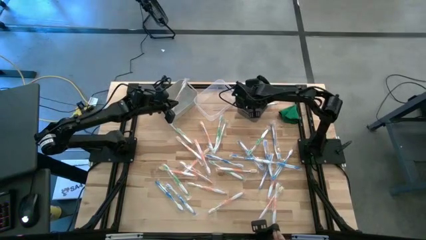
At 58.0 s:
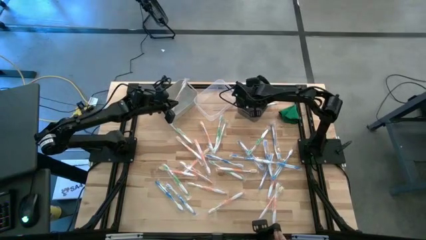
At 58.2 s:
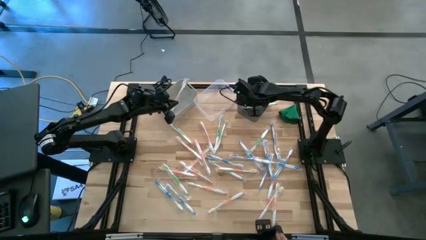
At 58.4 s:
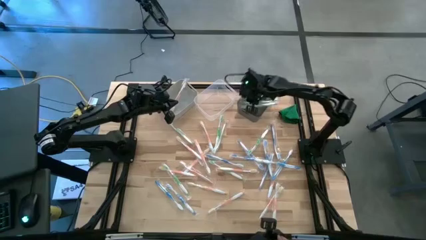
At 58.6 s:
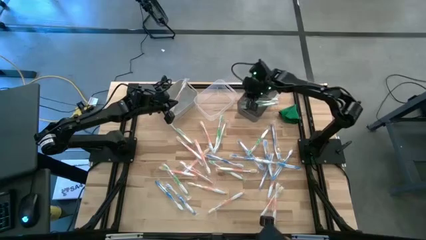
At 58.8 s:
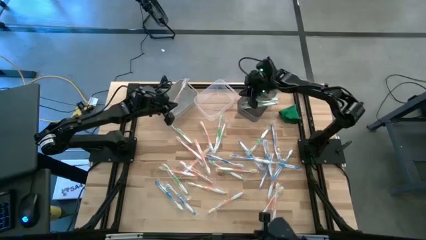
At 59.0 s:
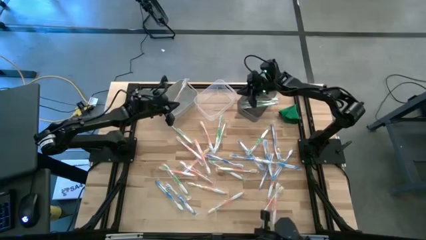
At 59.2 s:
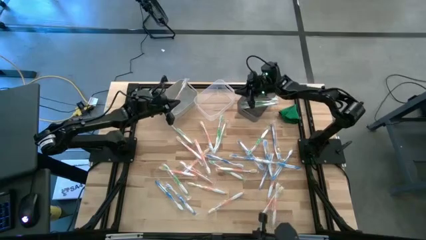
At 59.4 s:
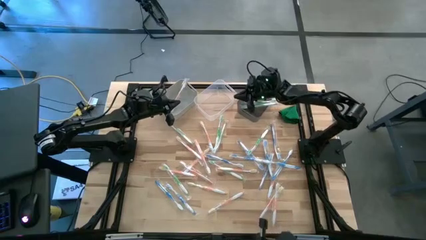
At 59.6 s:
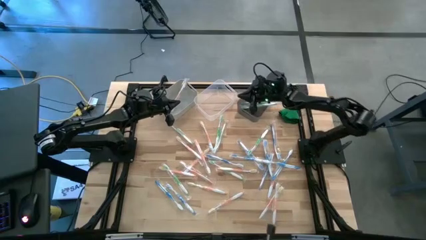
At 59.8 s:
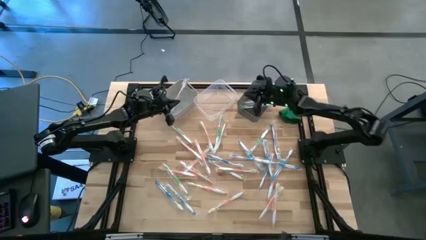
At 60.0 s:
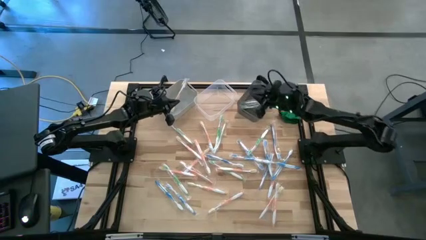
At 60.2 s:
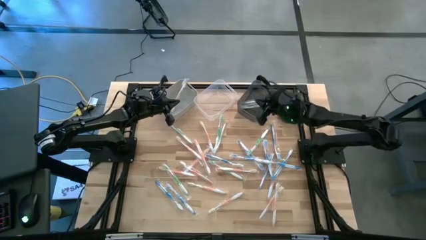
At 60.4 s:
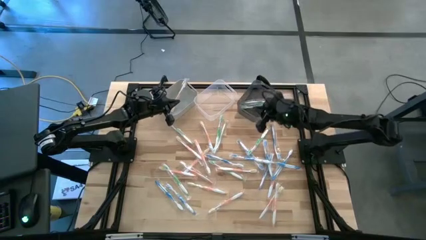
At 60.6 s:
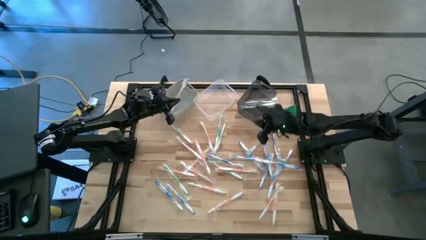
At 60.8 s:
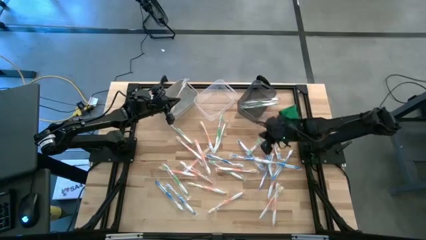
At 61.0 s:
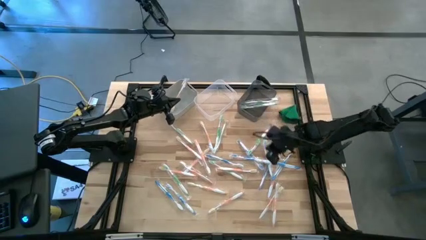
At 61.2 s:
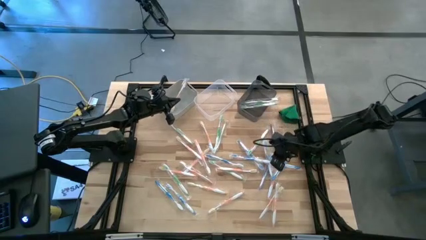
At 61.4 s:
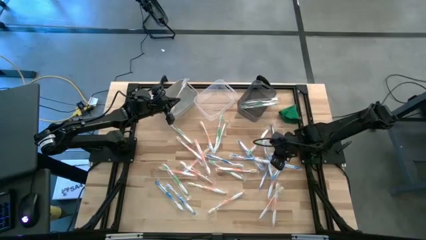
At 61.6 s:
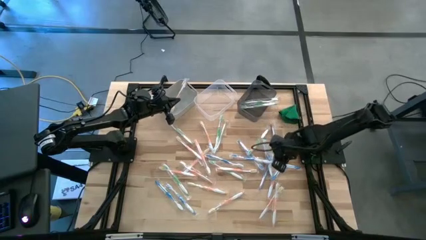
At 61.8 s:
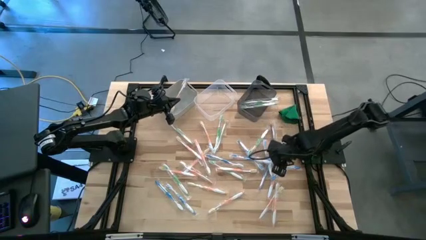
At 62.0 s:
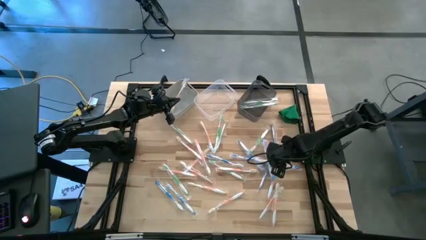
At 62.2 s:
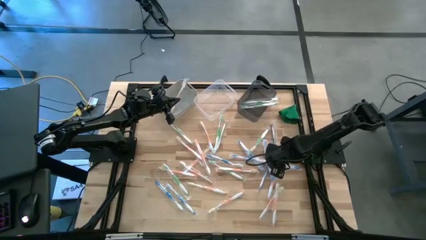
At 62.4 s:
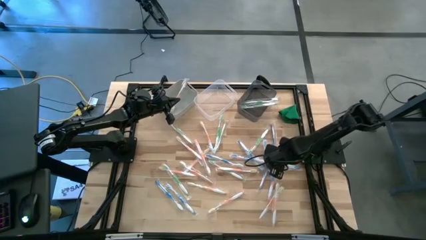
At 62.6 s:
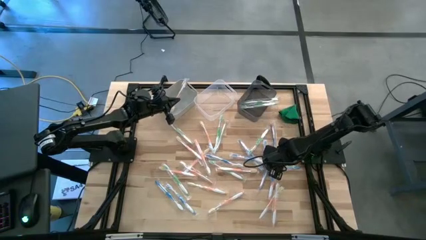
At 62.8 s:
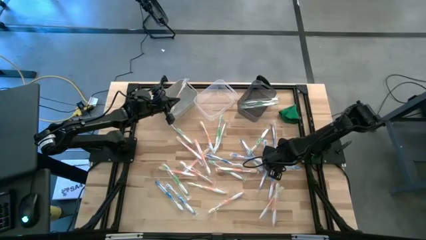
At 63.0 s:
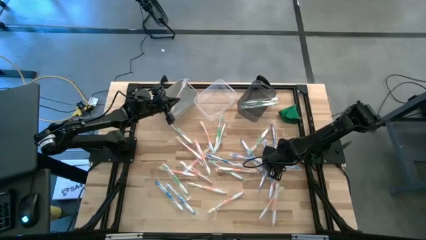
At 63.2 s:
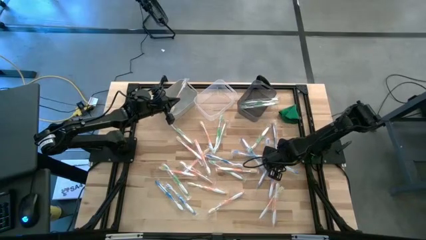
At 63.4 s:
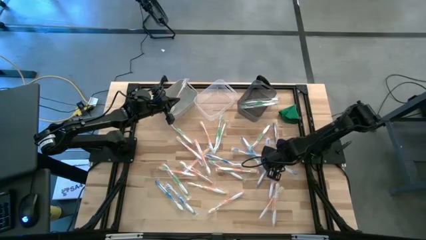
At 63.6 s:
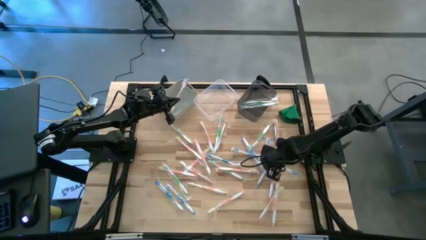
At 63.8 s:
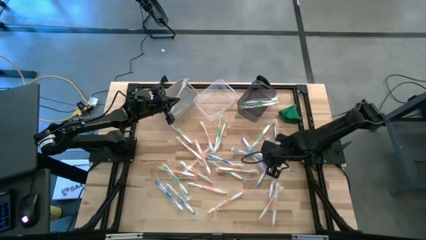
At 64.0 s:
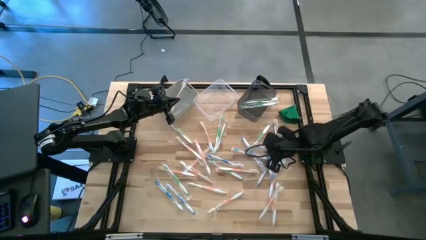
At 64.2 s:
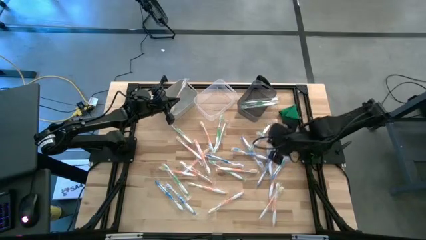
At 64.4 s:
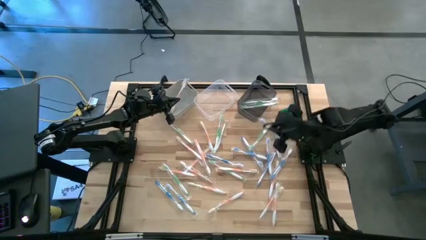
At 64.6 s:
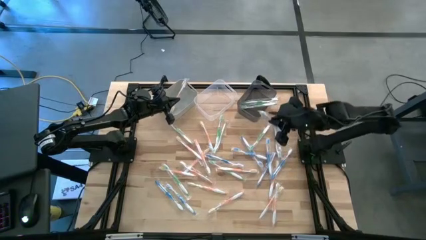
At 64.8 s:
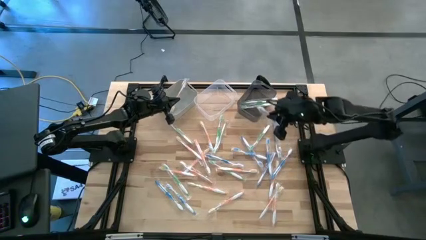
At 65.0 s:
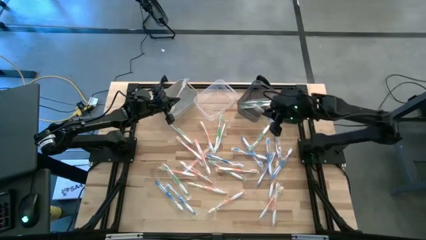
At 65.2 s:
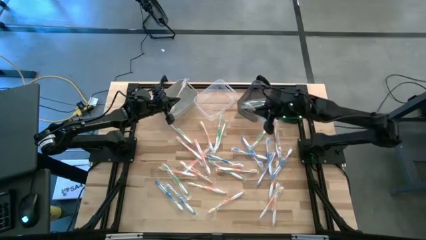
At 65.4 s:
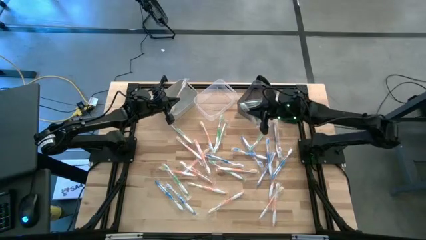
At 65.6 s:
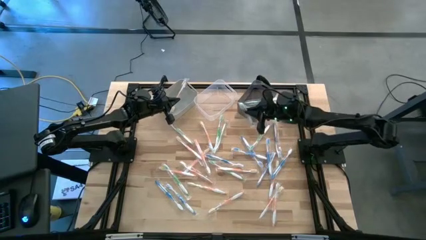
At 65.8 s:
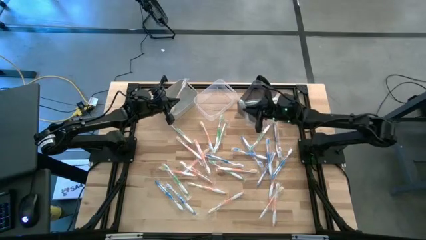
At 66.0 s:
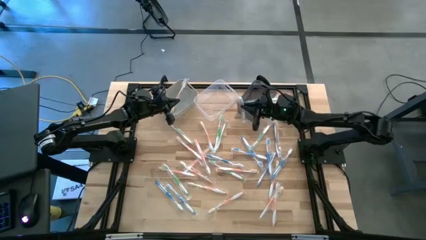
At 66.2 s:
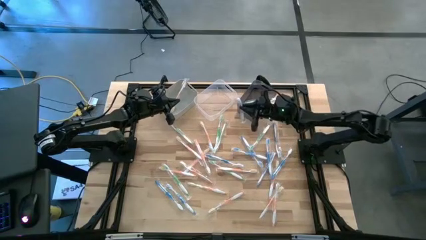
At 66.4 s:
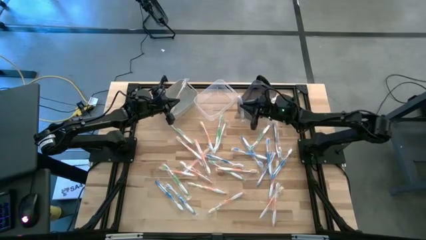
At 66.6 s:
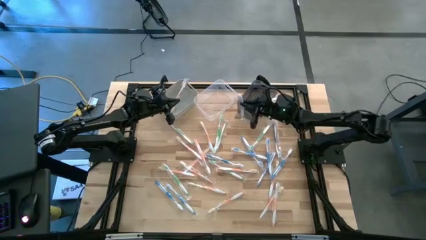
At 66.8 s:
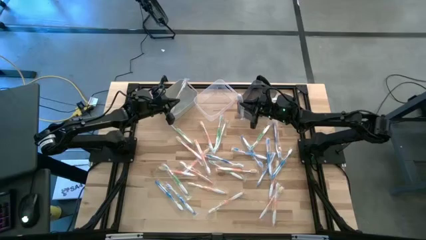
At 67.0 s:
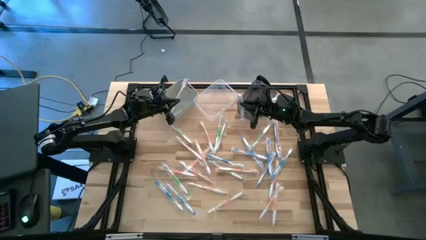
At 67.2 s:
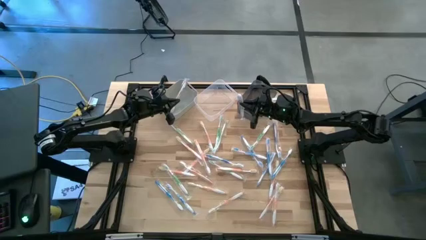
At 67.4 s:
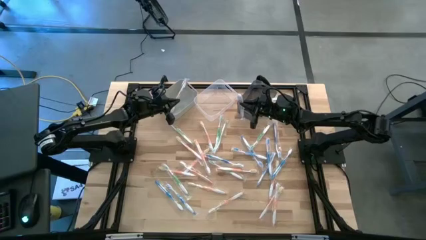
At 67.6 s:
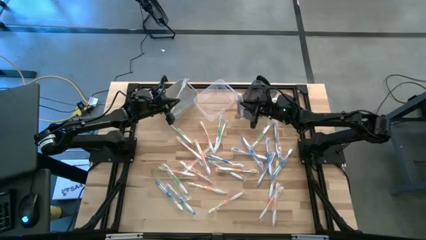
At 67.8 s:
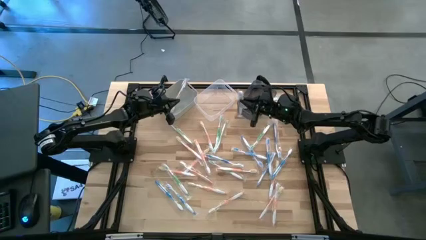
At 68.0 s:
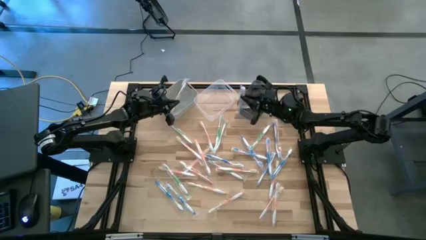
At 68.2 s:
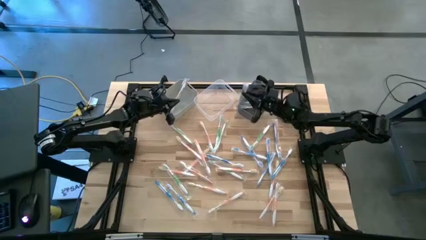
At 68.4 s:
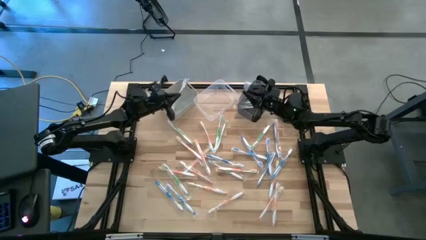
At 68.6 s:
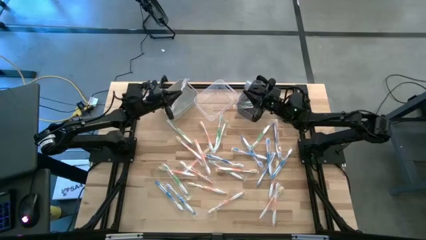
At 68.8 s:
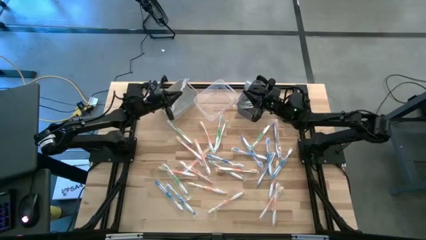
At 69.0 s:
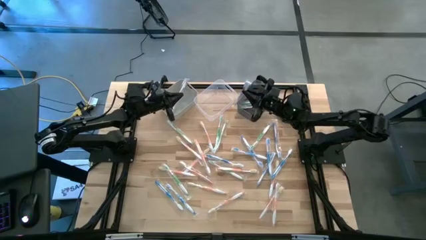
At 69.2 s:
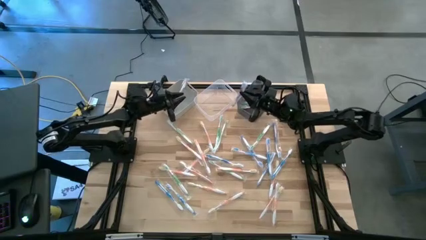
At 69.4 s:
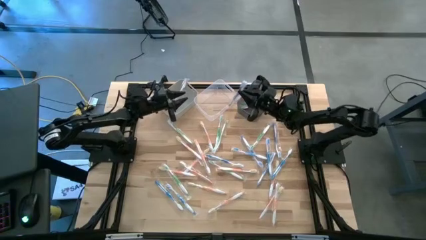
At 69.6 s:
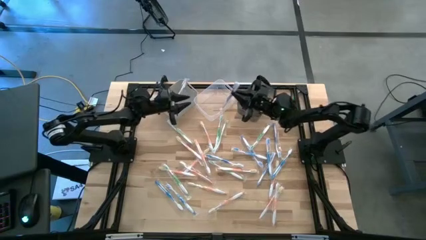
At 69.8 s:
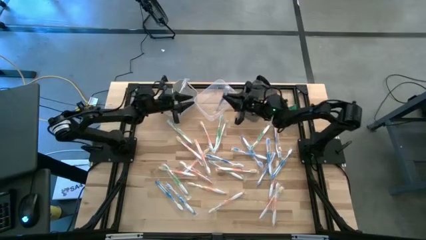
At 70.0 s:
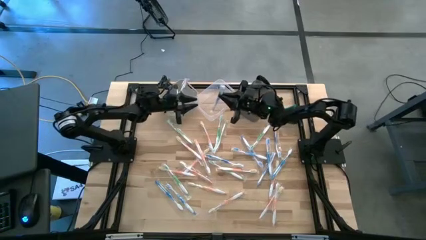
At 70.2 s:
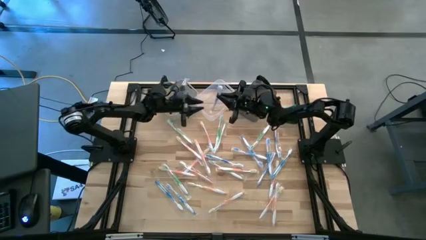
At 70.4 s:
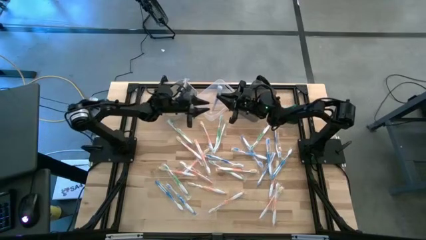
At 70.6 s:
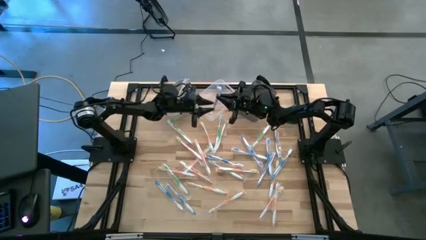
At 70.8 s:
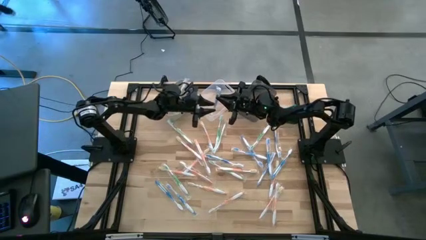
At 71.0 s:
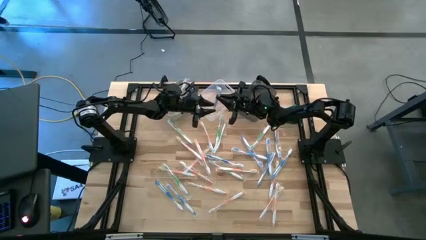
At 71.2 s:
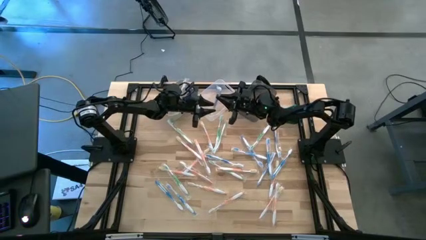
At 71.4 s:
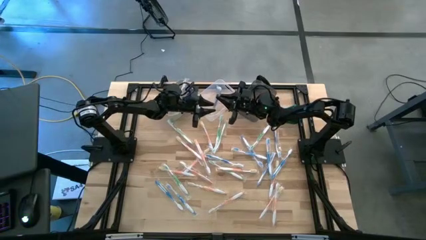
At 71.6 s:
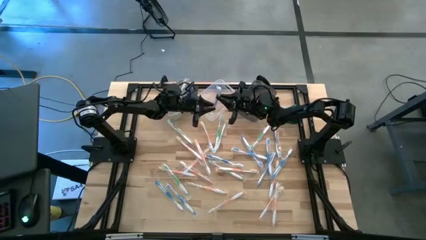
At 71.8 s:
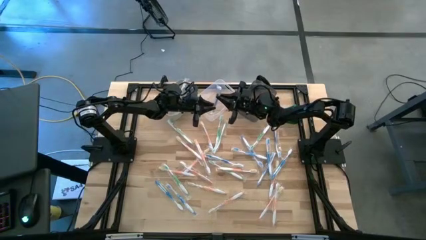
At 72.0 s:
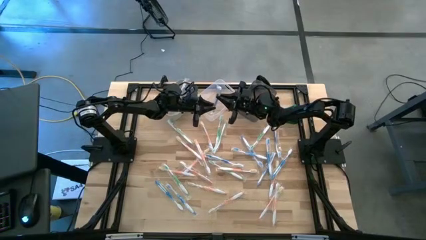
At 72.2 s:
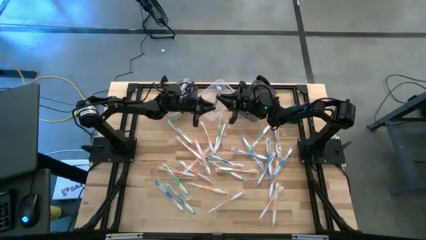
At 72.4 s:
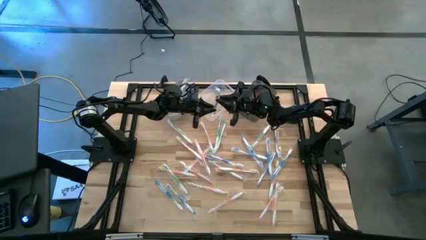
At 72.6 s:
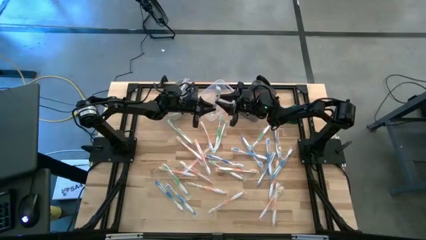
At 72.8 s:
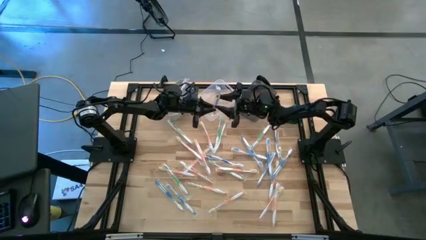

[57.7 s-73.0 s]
Task: Pick & Place Toothbrushes
Put the blue toothbrush into the transparent bin

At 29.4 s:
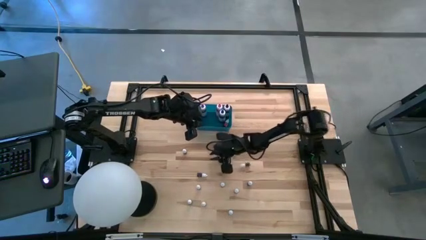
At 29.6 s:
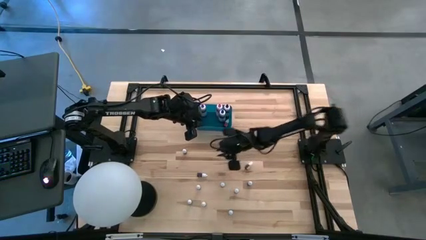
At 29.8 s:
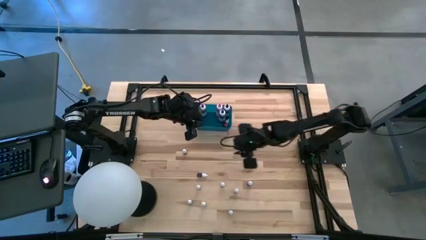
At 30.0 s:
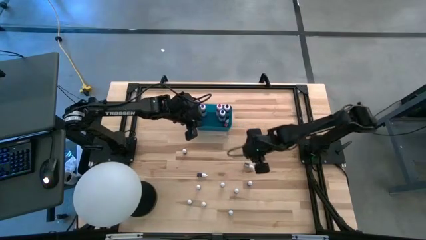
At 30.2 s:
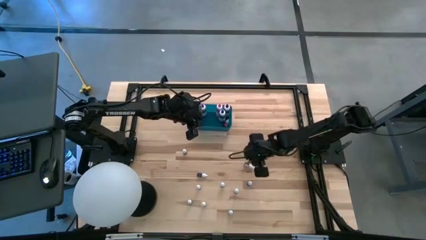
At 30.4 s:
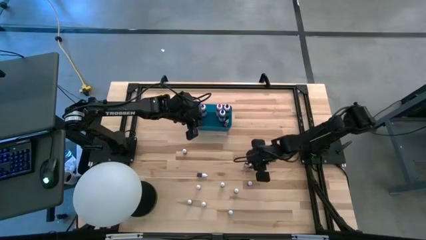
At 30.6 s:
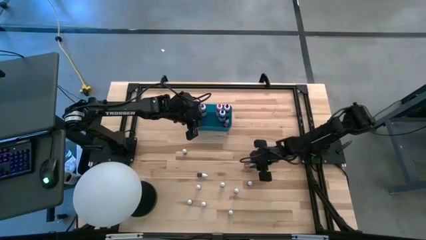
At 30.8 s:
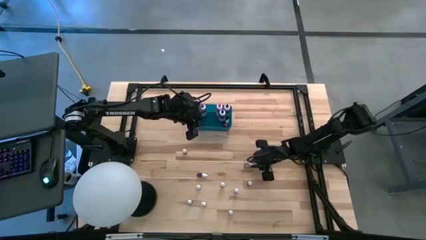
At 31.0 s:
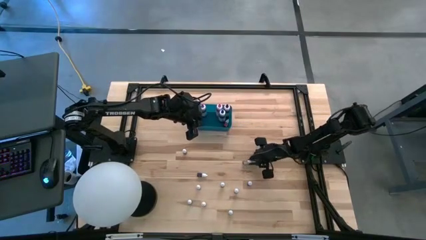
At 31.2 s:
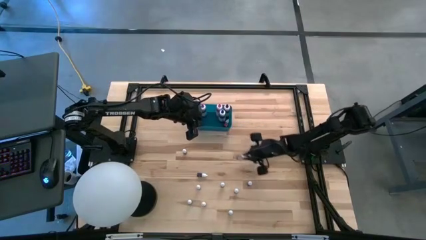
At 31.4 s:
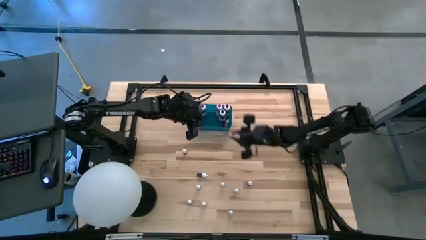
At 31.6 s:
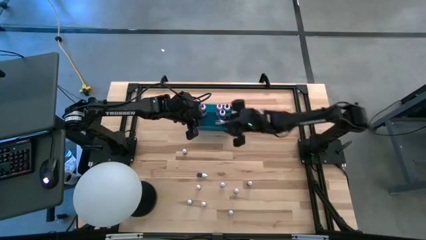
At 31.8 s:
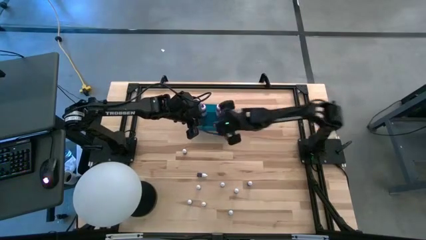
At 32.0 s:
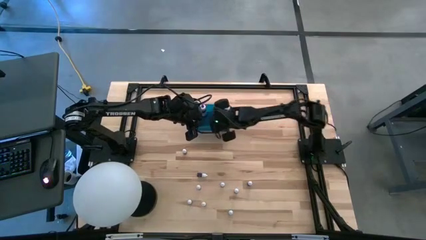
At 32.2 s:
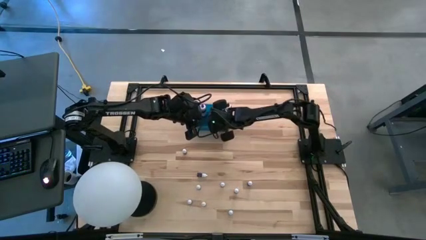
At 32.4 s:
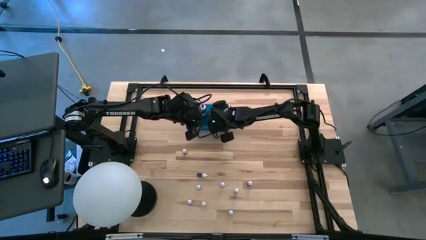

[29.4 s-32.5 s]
Task: Pick & Place food coloring
Put the black food coloring into the blue bin
